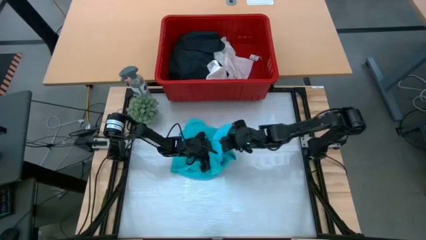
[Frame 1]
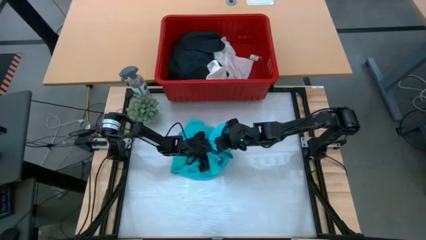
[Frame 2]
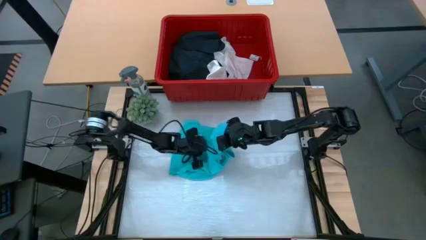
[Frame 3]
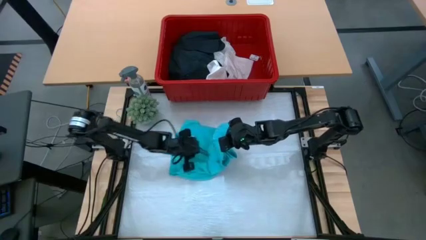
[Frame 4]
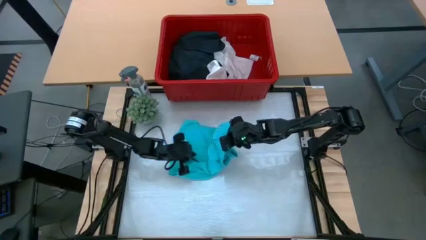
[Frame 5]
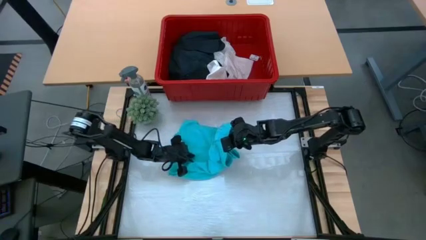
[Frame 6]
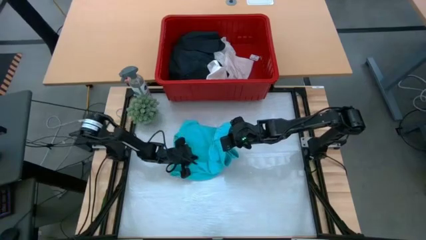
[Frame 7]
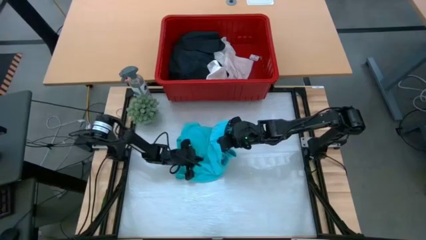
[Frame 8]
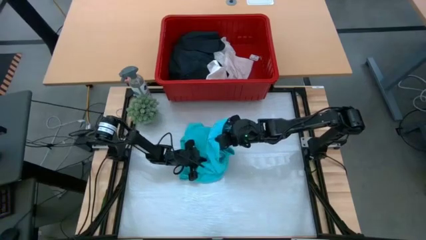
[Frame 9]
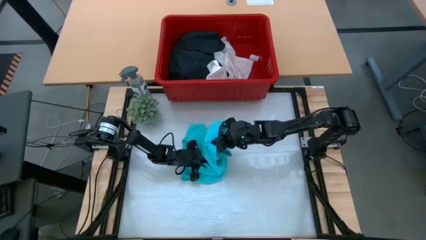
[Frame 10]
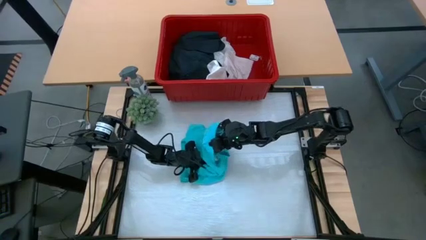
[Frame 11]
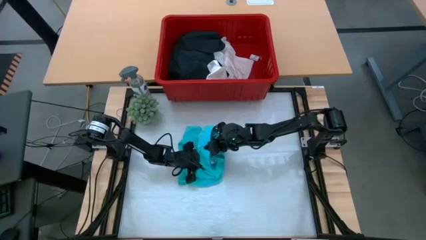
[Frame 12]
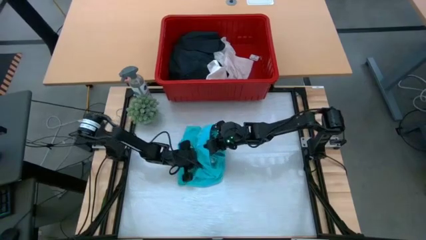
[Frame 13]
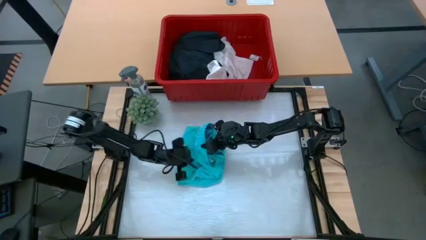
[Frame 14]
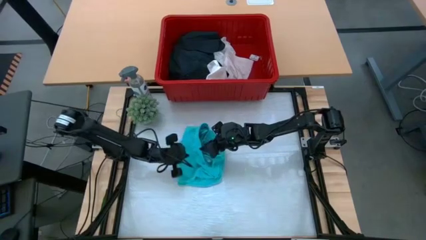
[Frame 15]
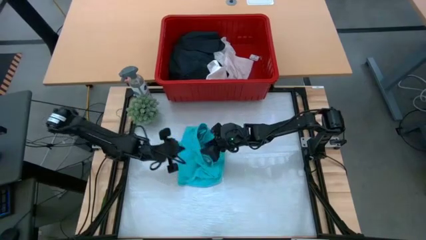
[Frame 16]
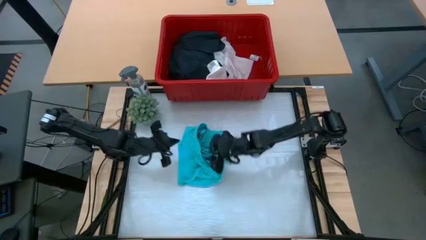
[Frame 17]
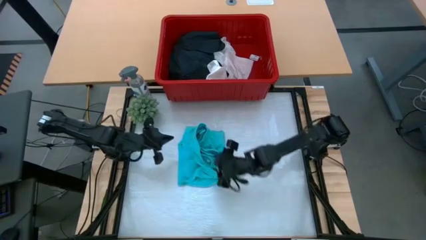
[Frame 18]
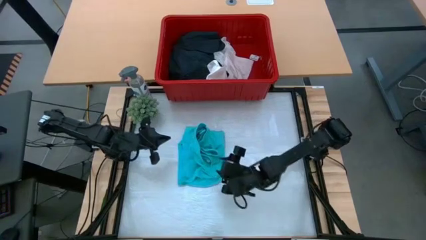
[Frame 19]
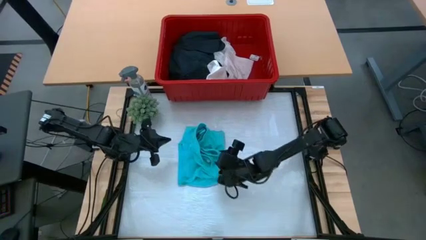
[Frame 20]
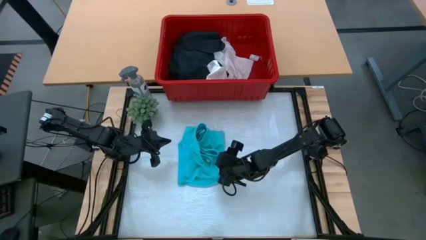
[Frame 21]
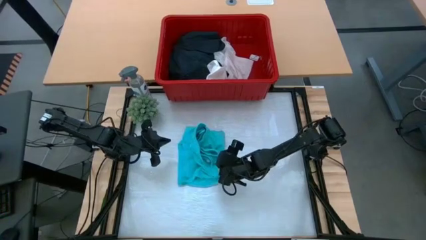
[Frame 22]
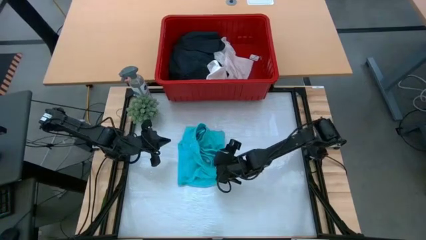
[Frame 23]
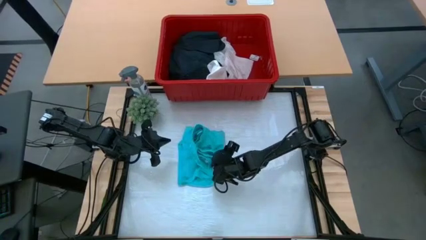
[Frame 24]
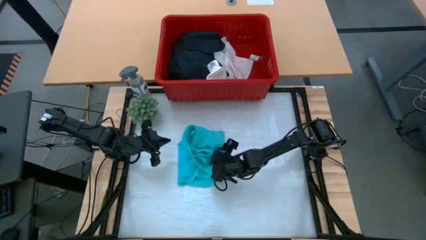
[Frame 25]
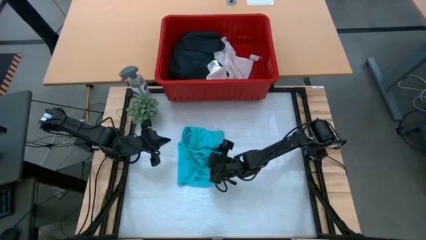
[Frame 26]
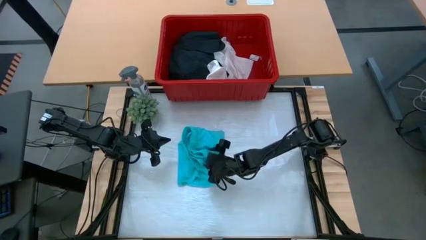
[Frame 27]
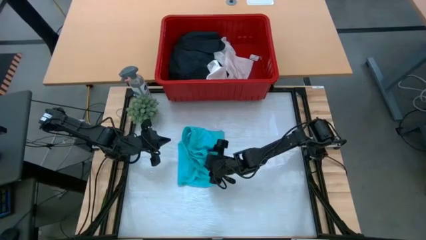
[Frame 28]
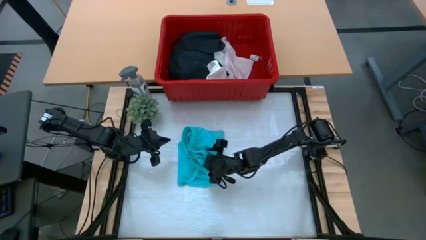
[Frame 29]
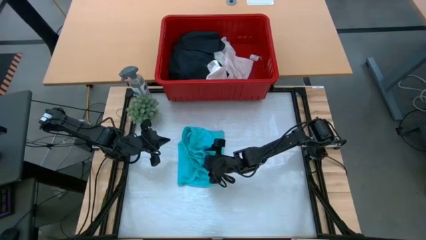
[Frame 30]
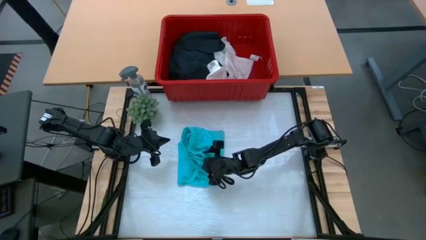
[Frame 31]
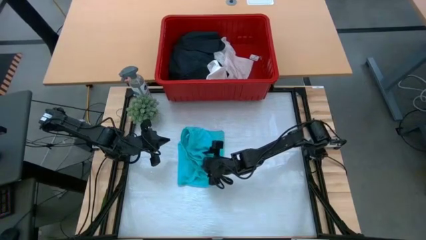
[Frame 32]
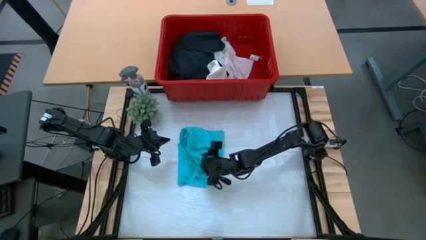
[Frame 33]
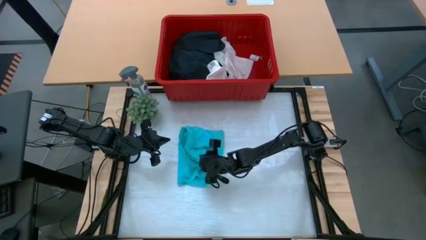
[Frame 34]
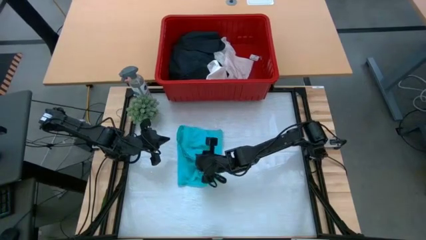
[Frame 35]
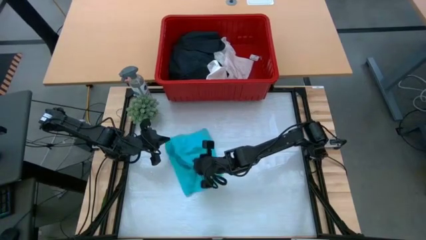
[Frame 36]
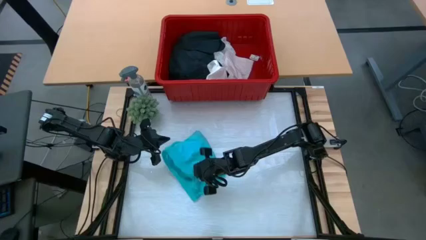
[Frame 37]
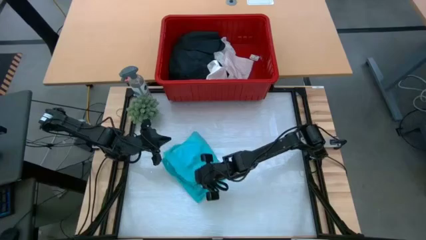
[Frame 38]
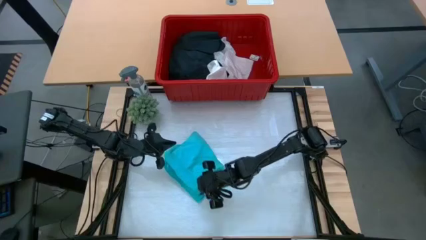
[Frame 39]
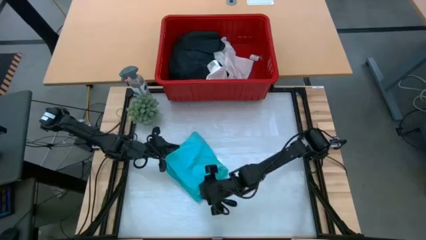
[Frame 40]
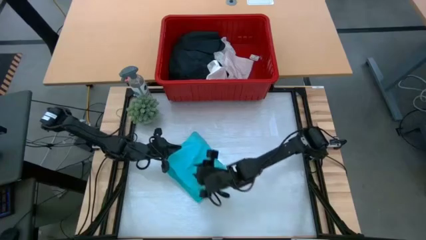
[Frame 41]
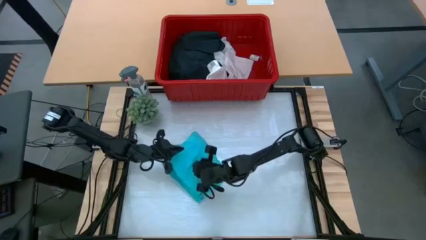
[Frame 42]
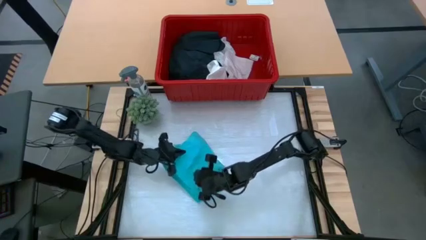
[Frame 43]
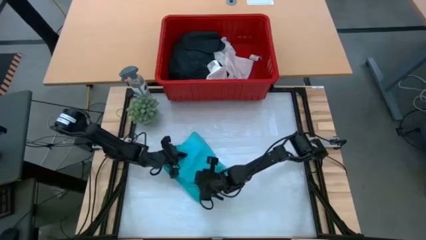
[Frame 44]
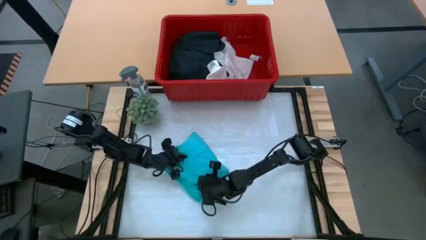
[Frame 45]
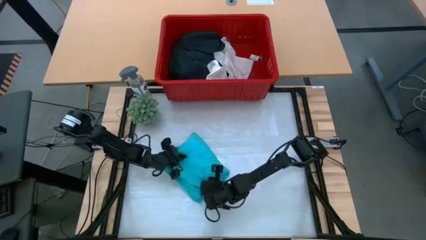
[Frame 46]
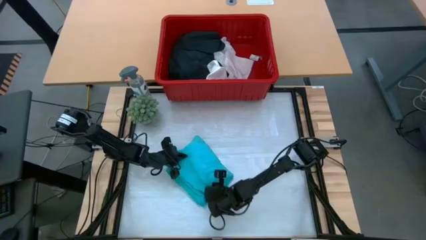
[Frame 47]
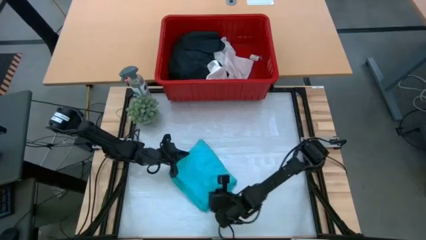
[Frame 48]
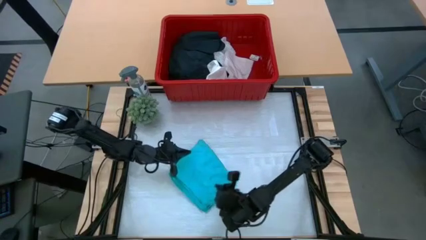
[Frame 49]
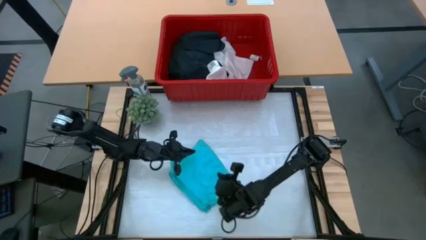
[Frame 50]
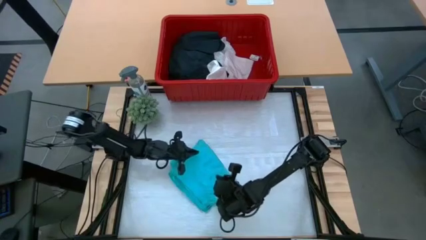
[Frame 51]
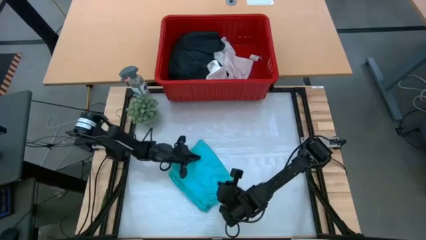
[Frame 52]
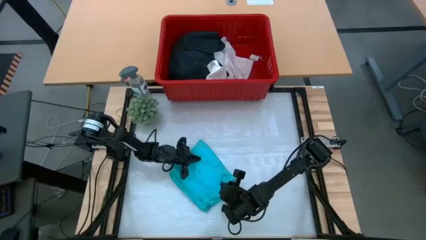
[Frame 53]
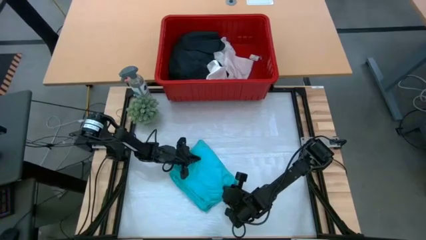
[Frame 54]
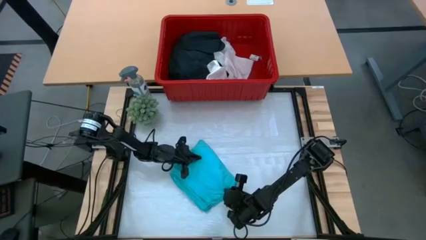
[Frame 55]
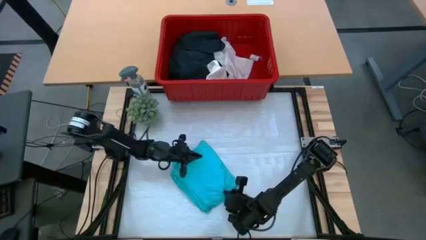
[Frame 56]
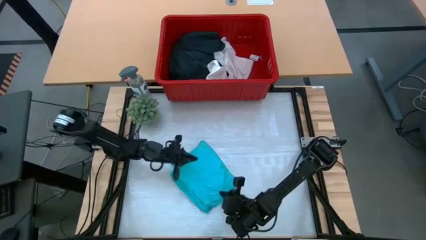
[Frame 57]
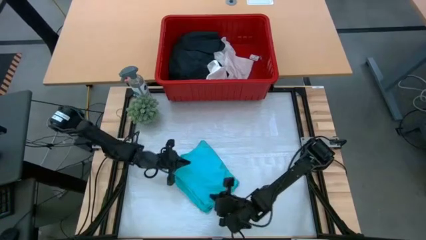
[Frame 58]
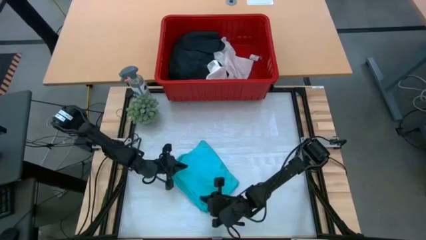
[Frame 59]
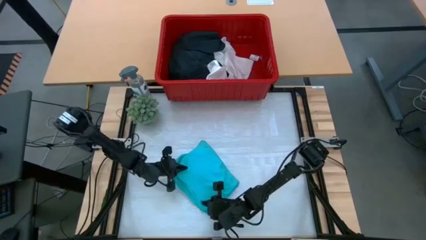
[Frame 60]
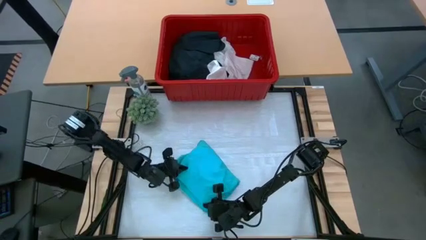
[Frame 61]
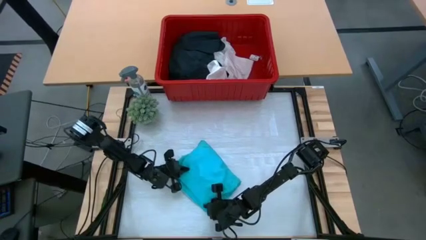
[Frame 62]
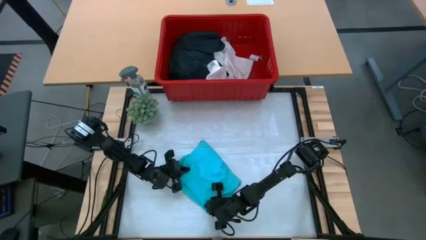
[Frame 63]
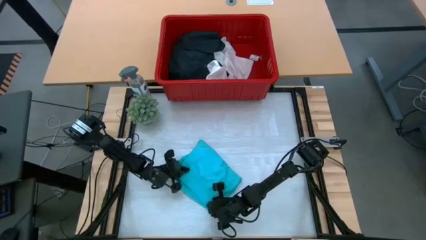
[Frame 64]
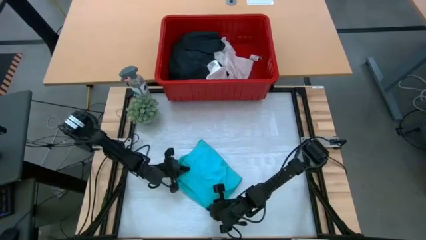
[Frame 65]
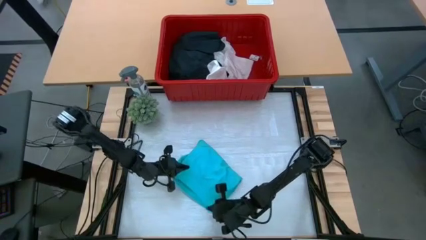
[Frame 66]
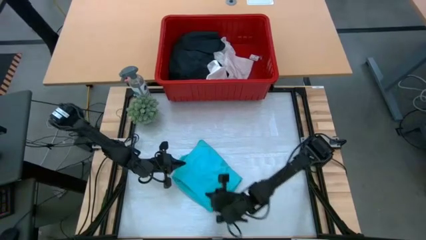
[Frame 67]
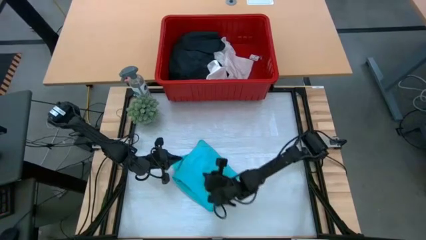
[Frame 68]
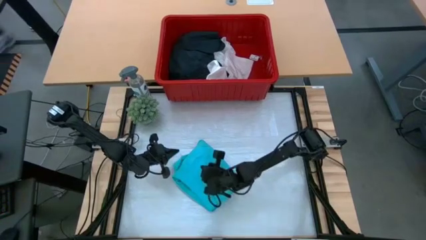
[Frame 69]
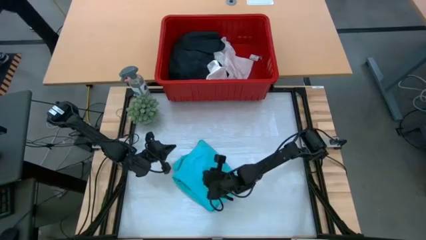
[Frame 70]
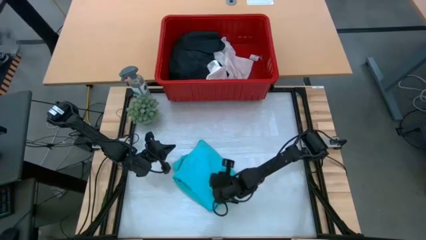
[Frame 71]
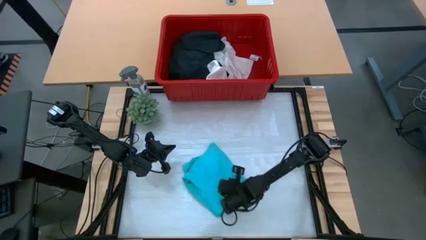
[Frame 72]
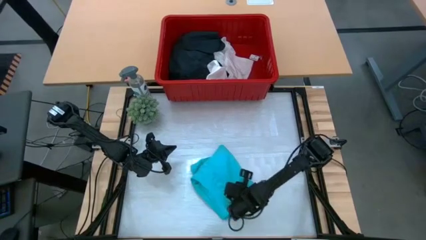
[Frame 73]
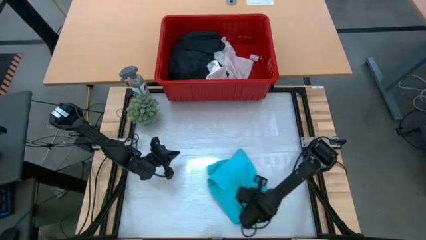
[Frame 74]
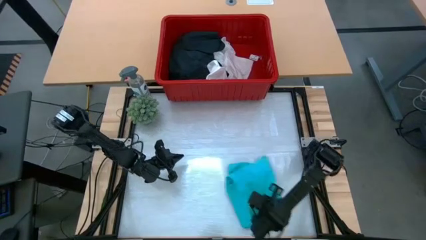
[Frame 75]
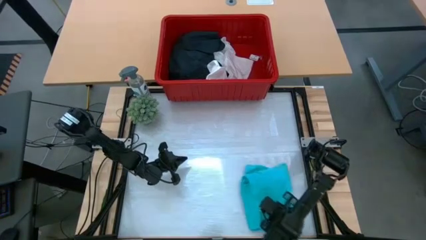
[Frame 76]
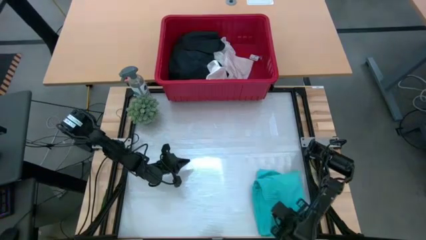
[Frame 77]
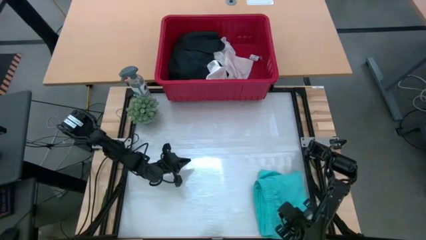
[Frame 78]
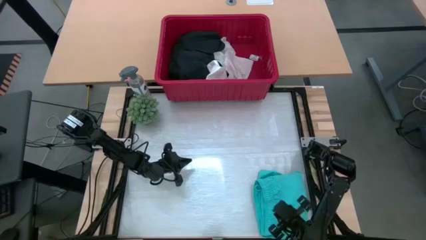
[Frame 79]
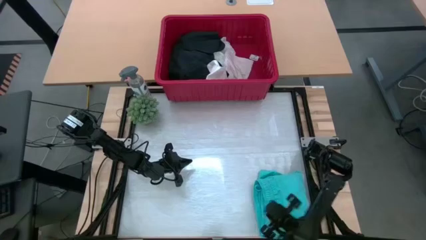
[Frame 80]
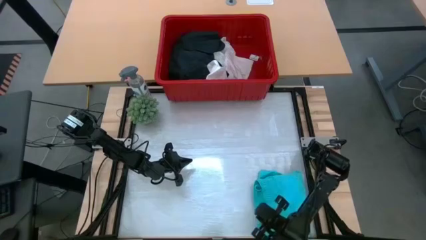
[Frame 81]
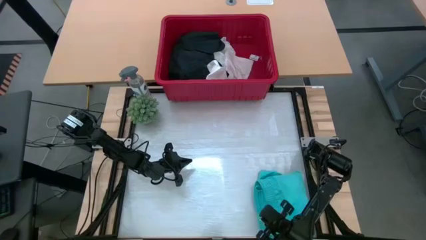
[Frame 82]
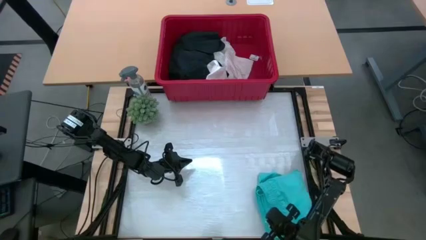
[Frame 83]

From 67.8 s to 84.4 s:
Task: Fold Laundry from Bin
Fold the blue shorts

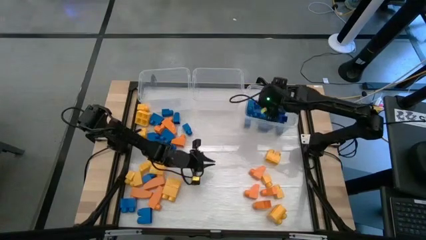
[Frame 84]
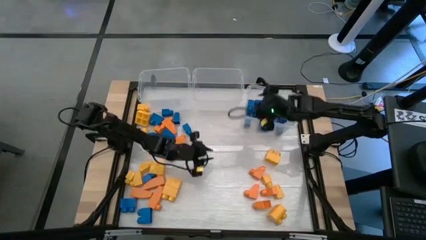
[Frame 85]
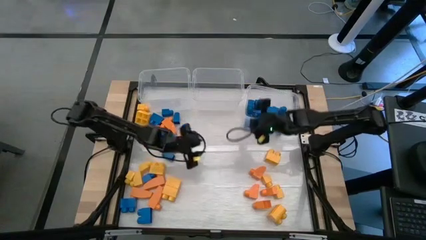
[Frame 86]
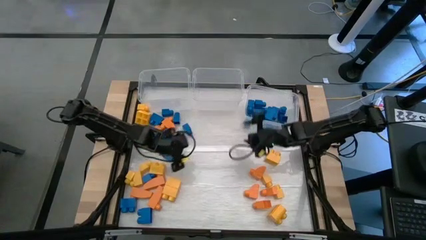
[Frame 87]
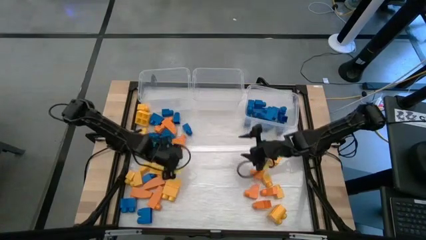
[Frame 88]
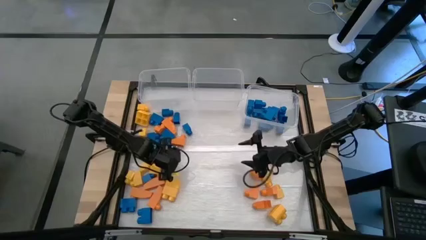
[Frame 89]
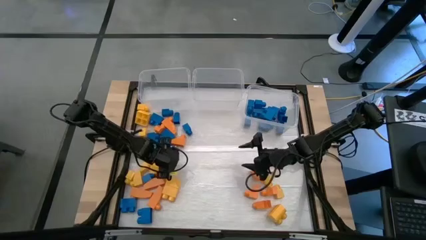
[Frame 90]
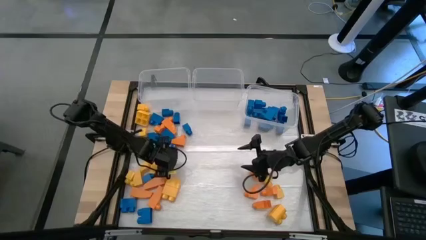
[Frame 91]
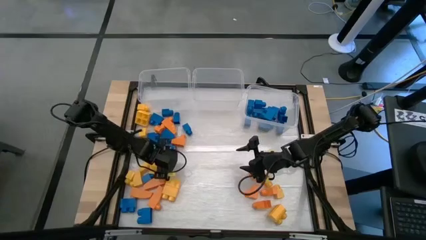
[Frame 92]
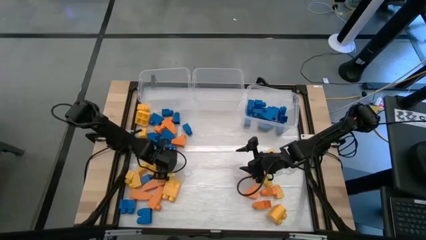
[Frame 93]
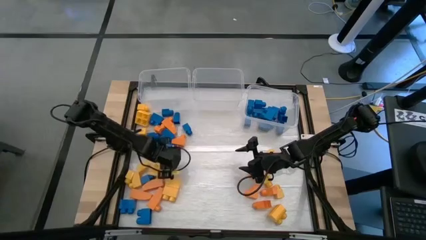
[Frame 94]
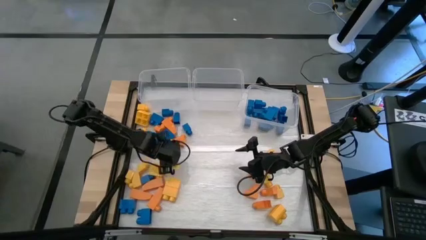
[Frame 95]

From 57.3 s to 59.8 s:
Task: Sort blocks
Put the blue game piece into the right transparent bin
